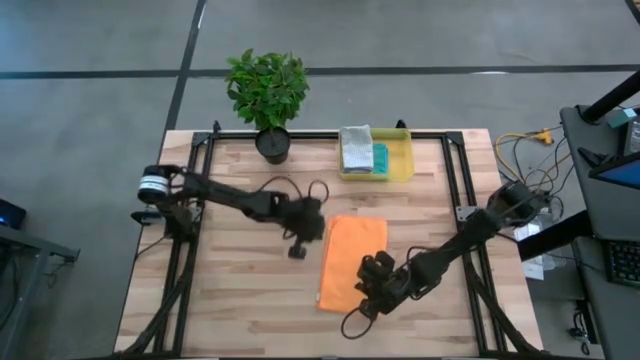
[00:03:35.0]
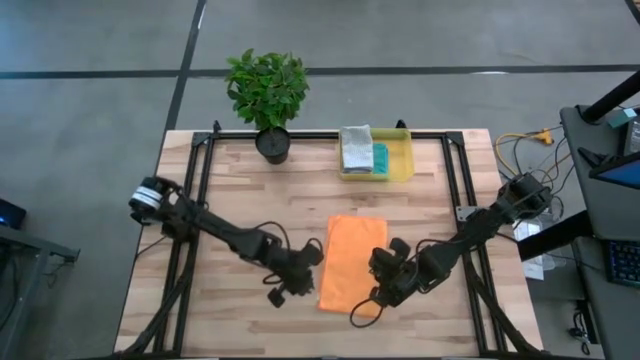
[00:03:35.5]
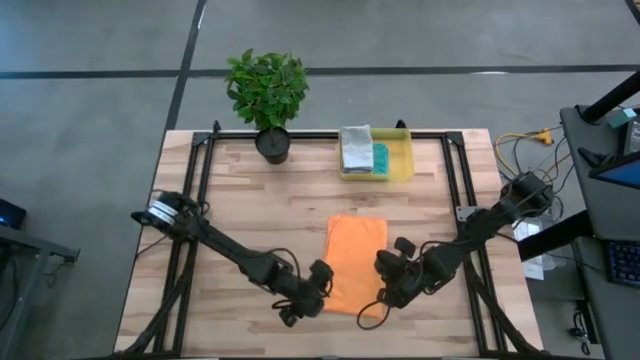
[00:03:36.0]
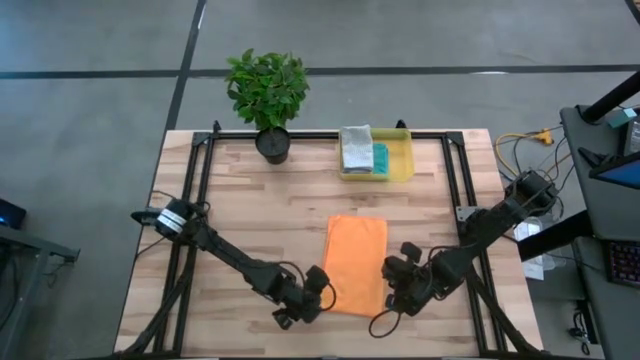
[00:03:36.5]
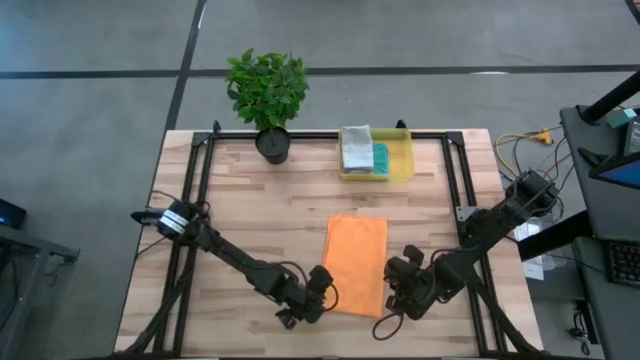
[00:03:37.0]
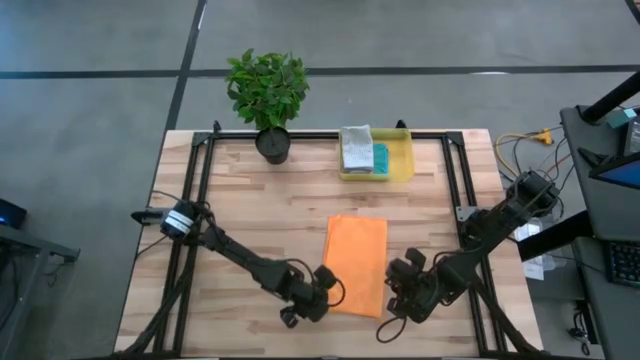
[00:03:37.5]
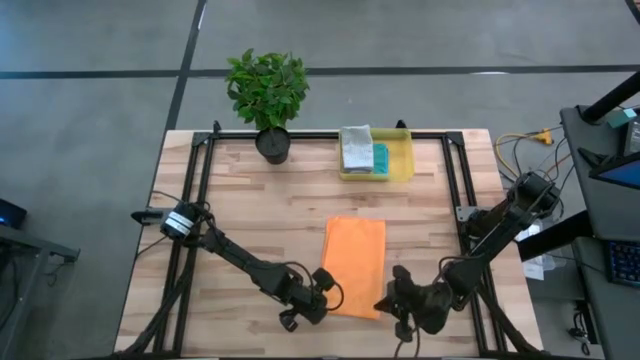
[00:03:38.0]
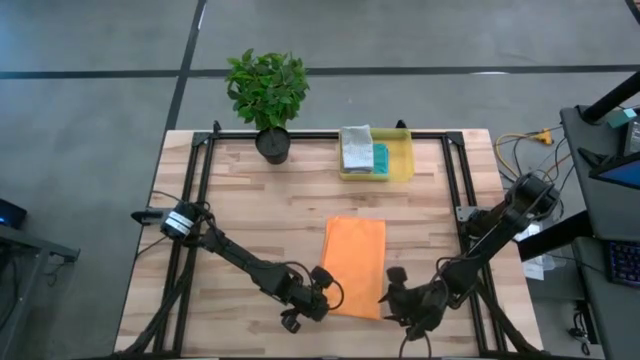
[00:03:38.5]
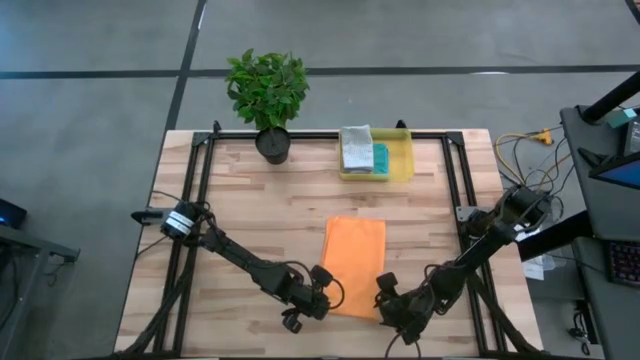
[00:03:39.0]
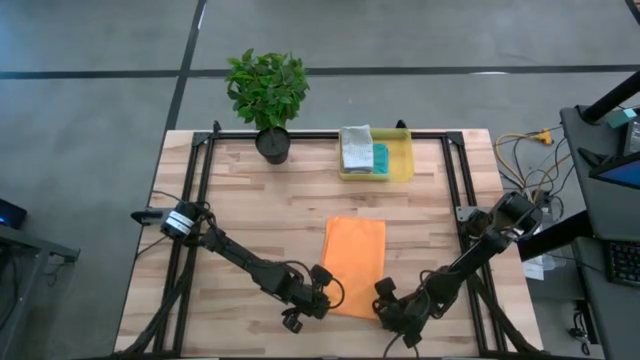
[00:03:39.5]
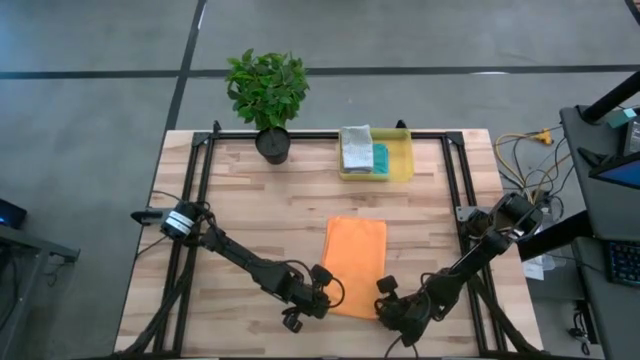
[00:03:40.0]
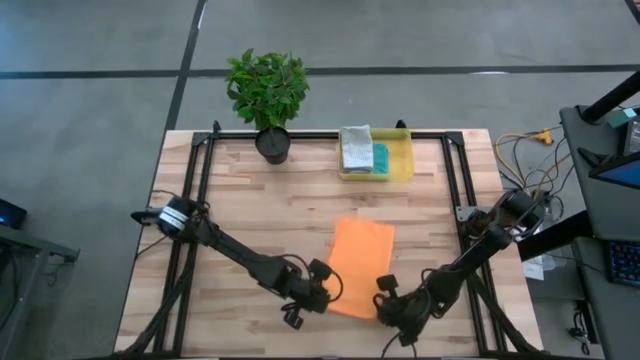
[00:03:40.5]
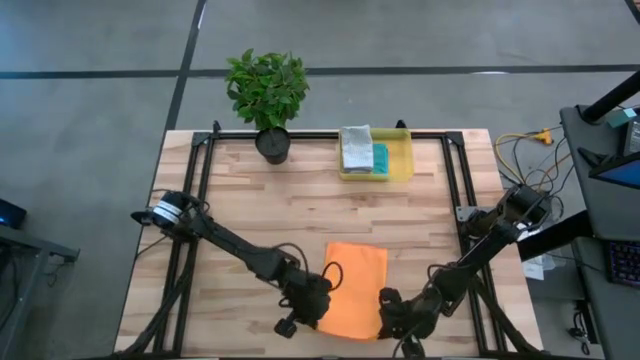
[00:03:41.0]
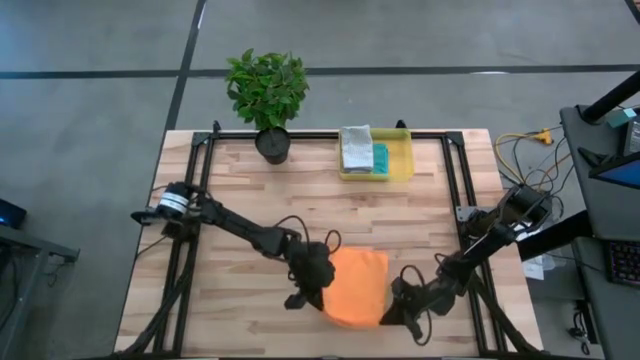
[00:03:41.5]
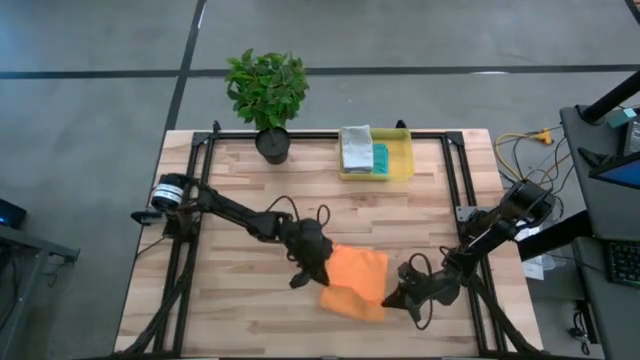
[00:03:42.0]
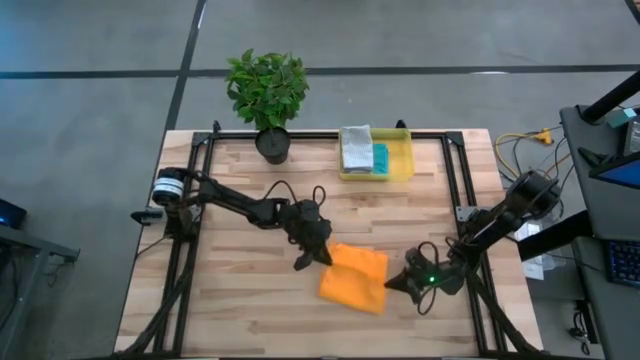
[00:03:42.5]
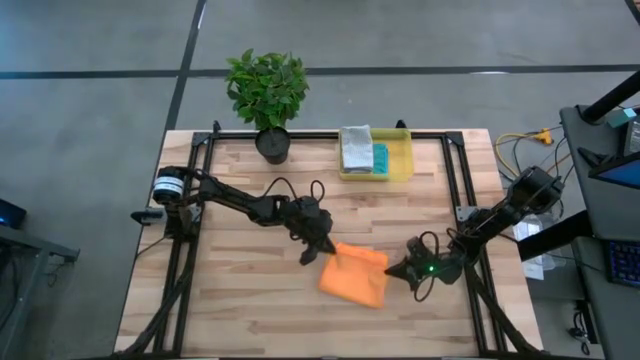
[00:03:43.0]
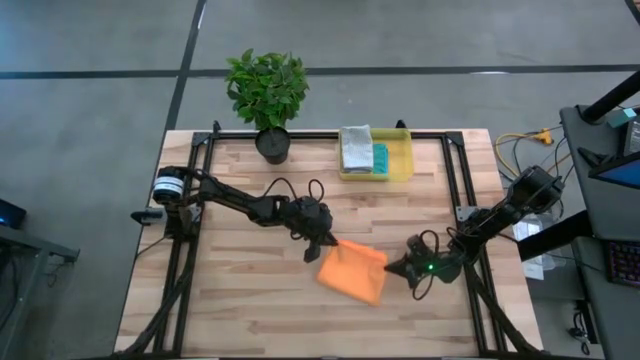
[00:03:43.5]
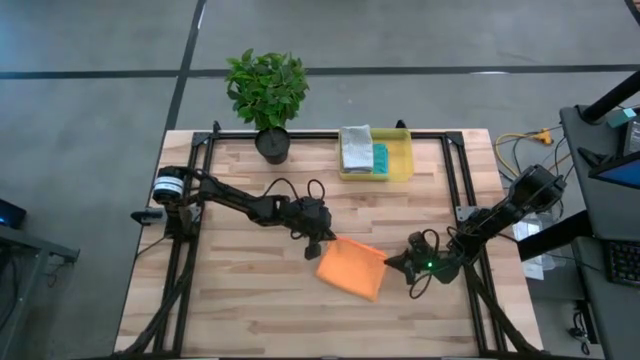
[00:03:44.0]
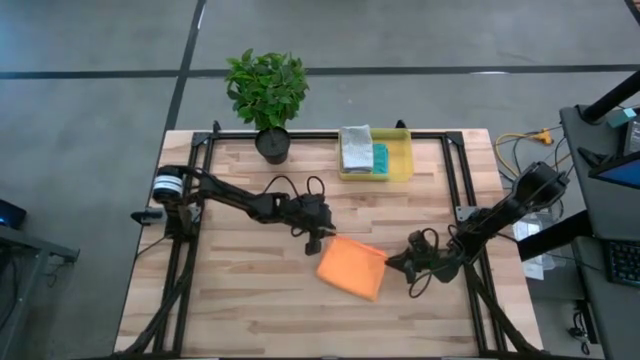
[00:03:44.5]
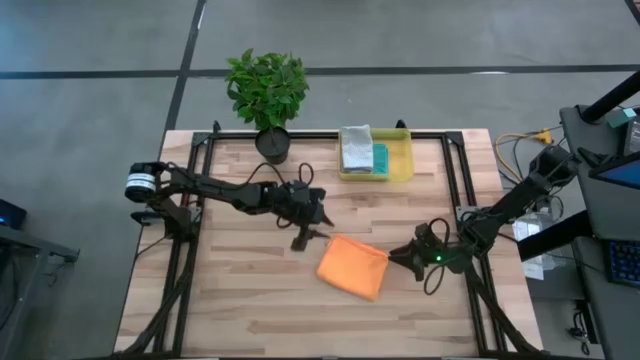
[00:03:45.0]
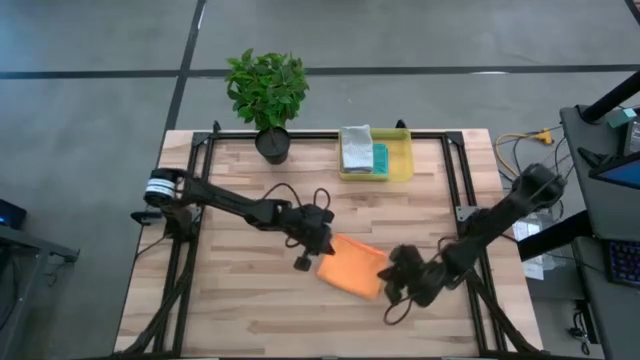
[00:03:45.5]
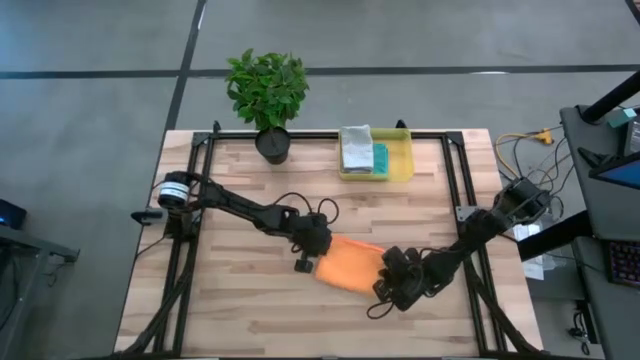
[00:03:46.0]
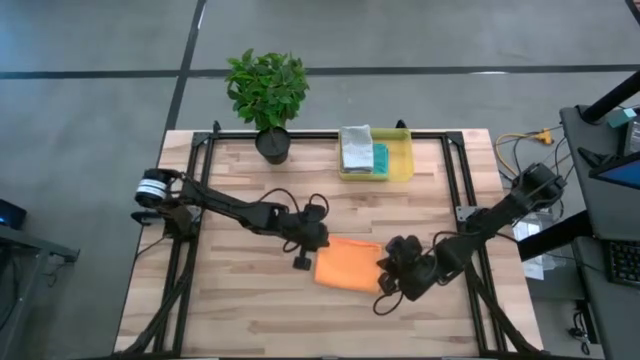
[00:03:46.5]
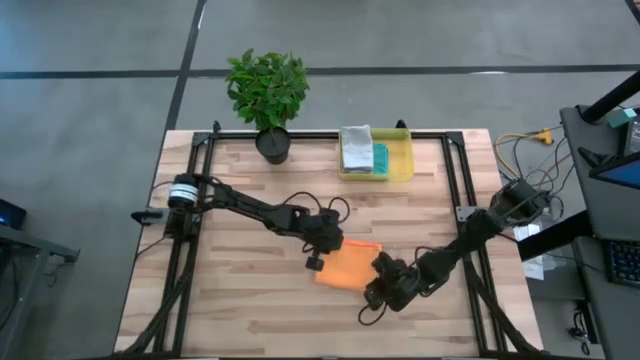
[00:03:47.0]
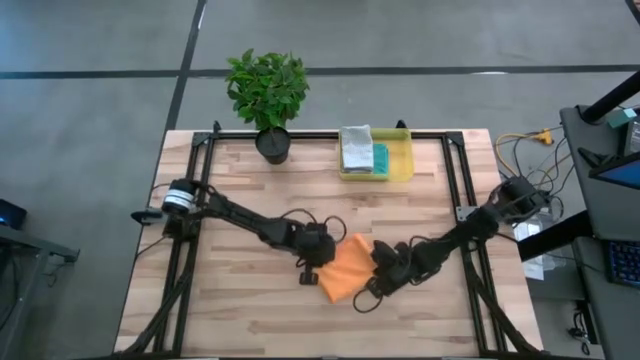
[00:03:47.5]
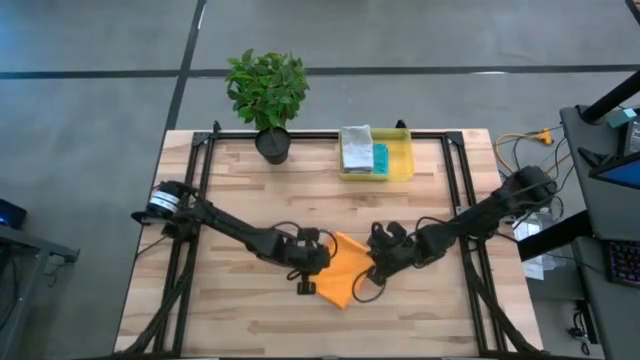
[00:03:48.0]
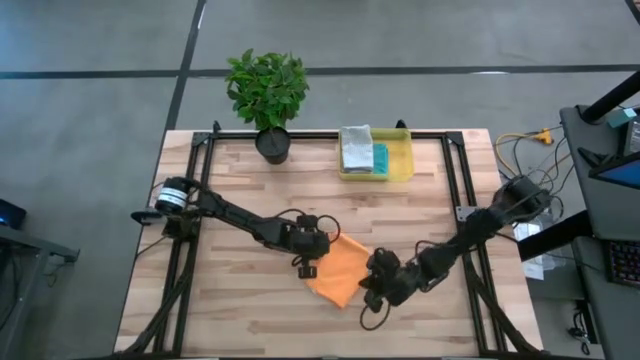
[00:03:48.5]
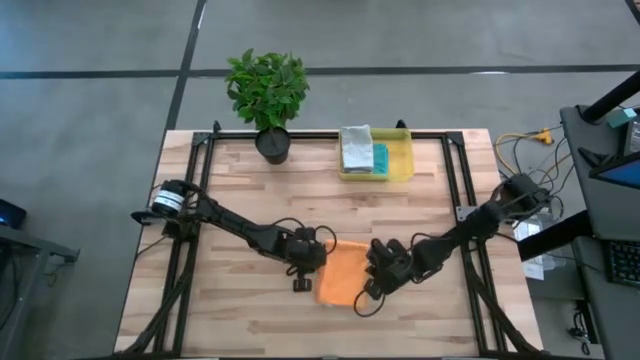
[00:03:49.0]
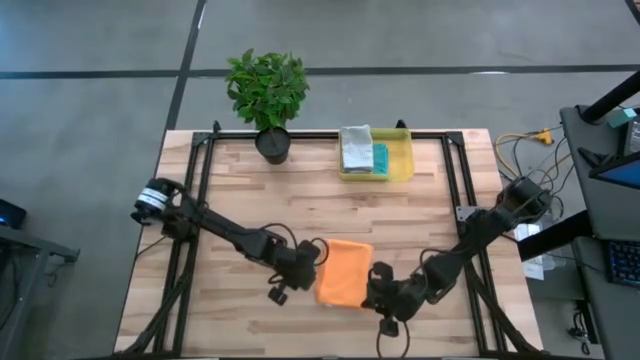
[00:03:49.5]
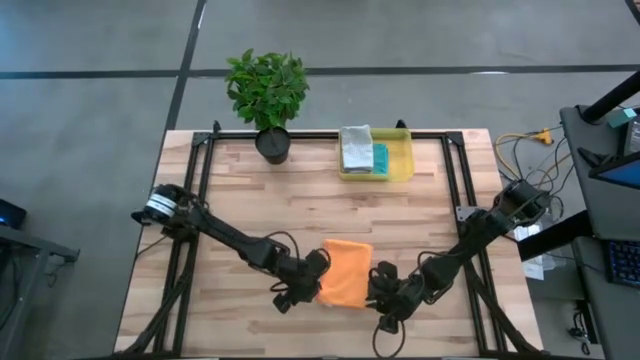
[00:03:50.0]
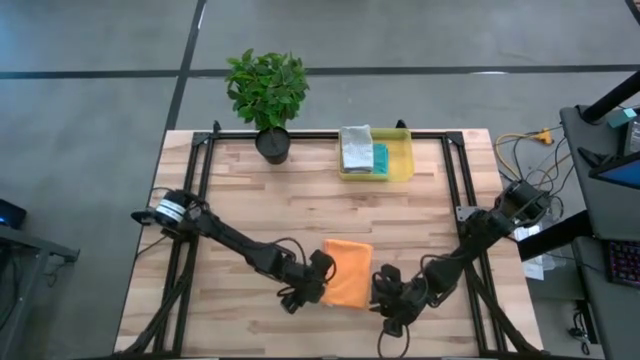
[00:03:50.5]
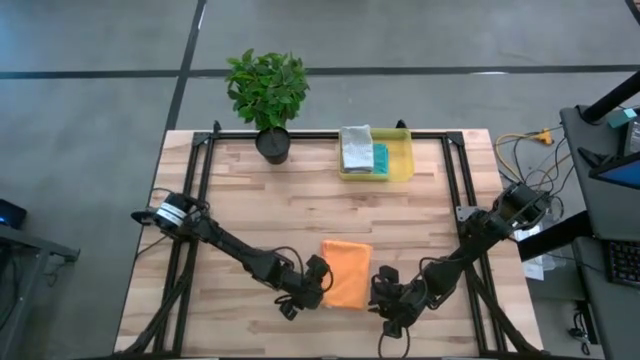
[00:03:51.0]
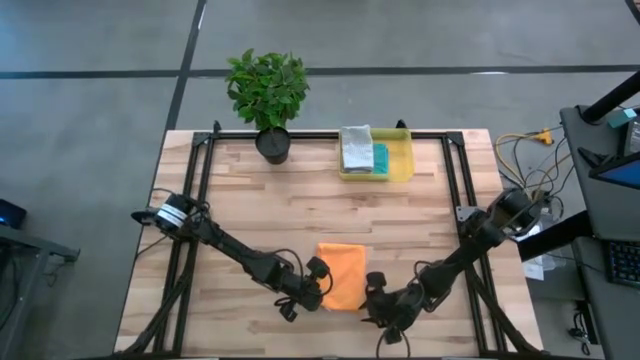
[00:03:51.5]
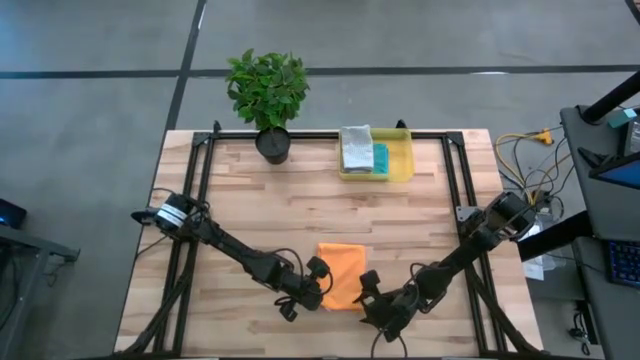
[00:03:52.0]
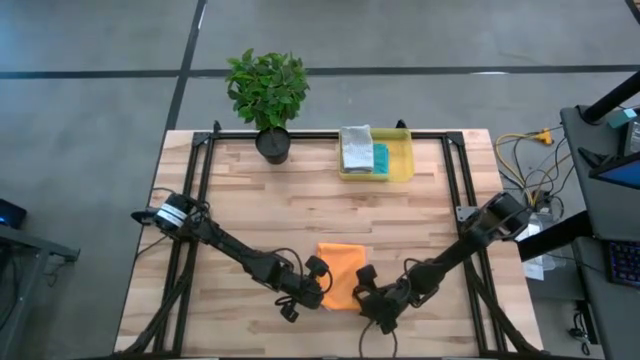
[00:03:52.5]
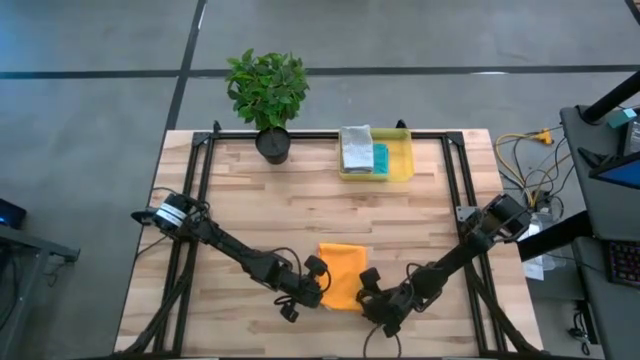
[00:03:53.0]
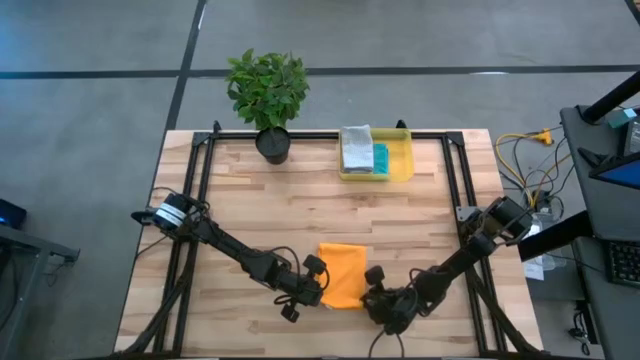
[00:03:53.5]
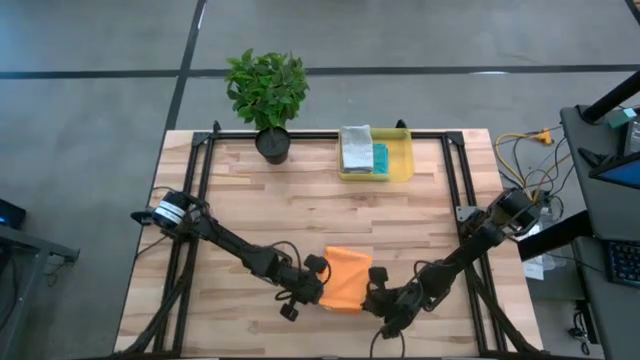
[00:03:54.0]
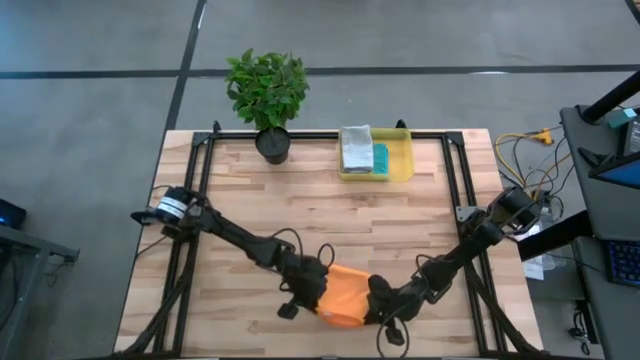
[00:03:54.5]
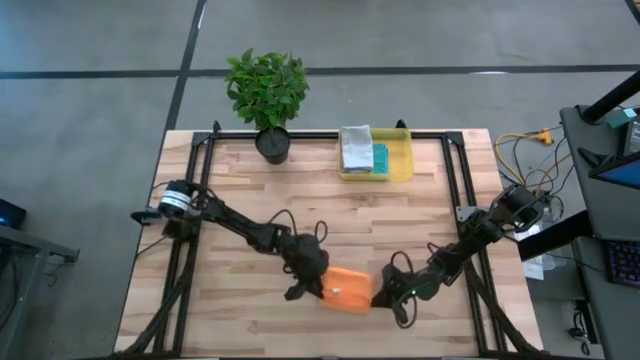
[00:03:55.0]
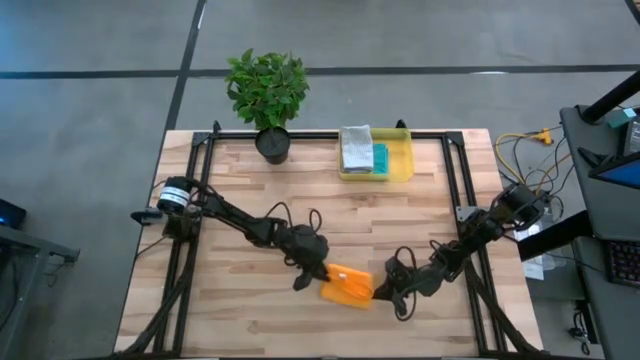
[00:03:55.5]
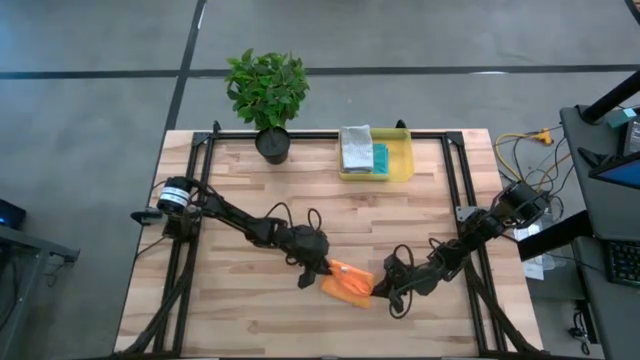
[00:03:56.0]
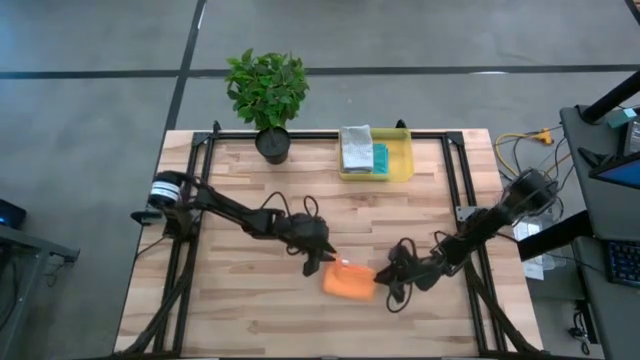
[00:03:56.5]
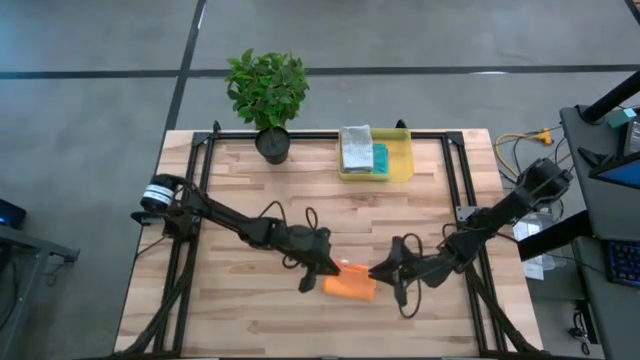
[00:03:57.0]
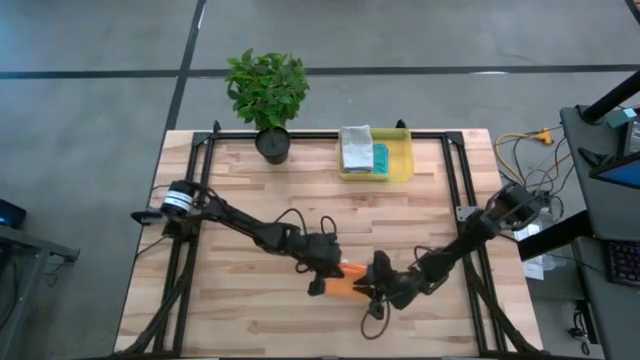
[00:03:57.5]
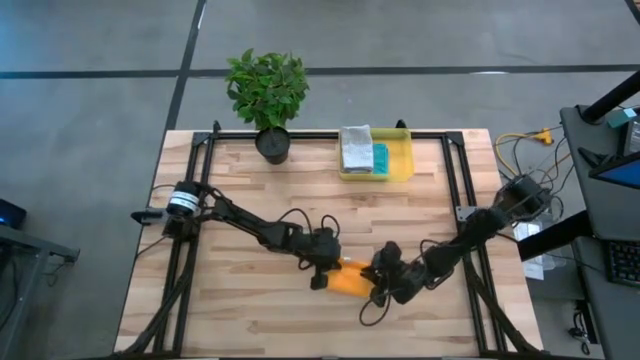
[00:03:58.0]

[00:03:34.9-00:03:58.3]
Task: Fold microfiber towels
Fold the orange microfiber towel
